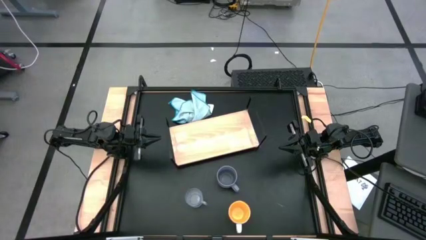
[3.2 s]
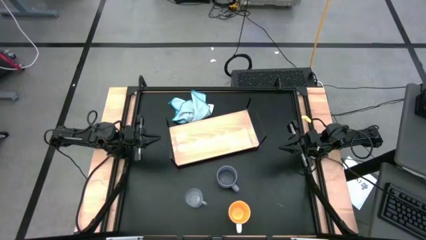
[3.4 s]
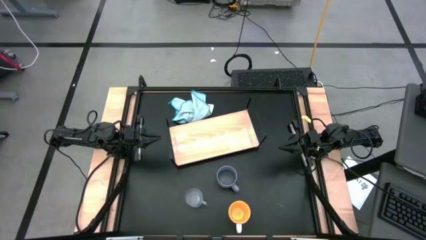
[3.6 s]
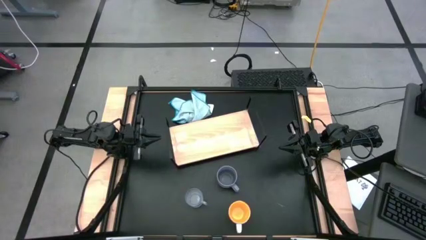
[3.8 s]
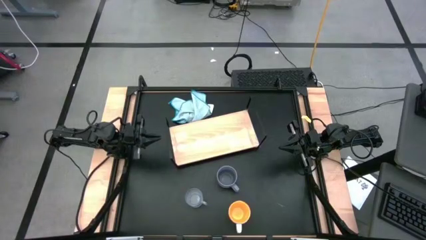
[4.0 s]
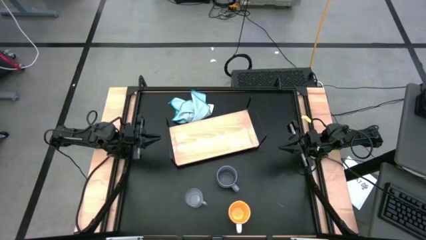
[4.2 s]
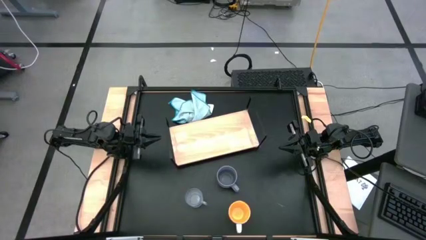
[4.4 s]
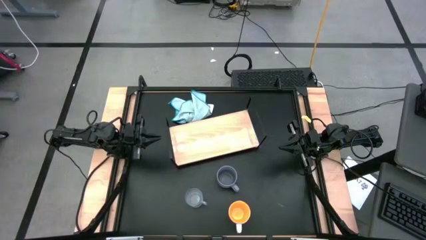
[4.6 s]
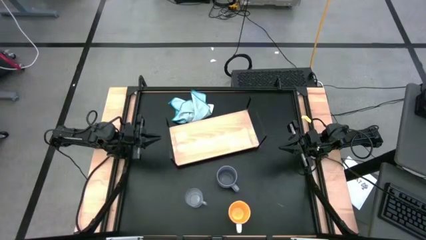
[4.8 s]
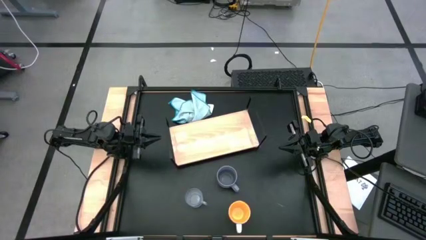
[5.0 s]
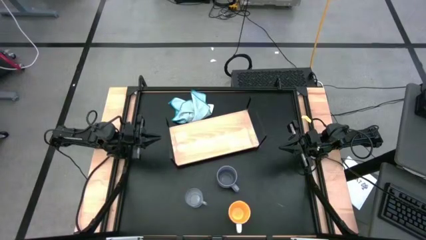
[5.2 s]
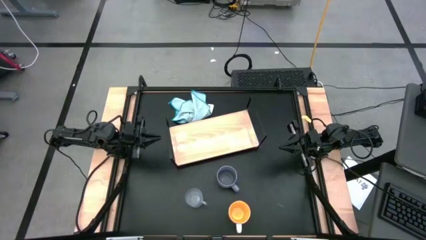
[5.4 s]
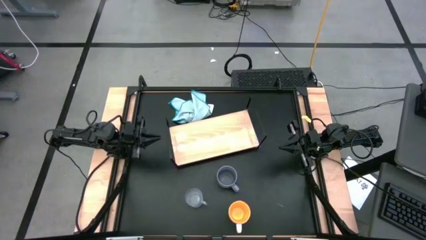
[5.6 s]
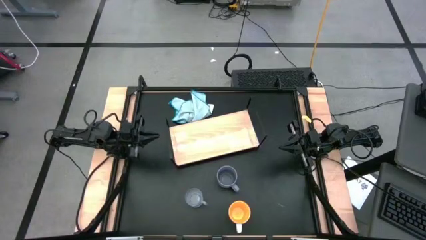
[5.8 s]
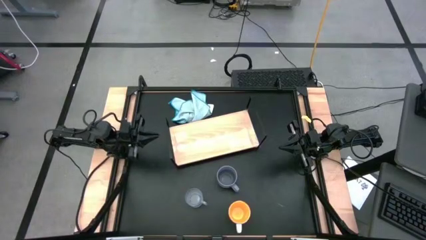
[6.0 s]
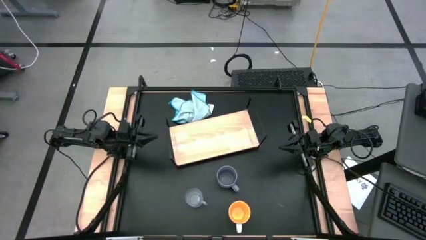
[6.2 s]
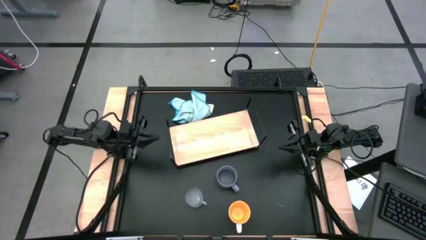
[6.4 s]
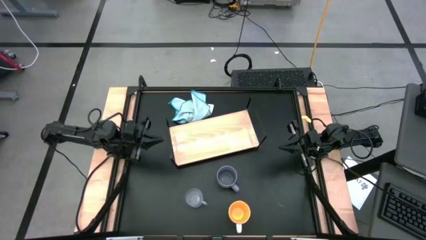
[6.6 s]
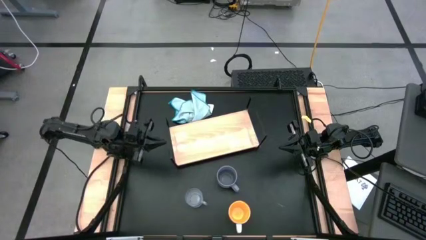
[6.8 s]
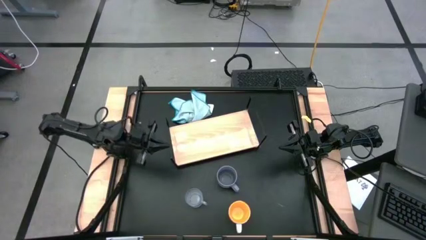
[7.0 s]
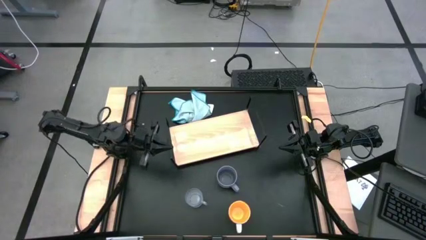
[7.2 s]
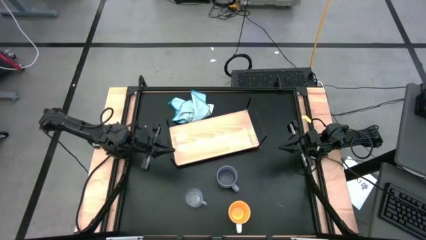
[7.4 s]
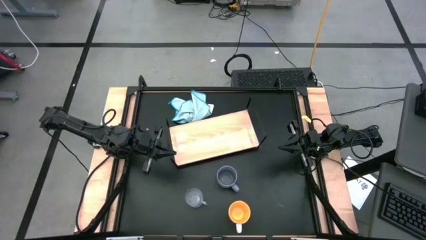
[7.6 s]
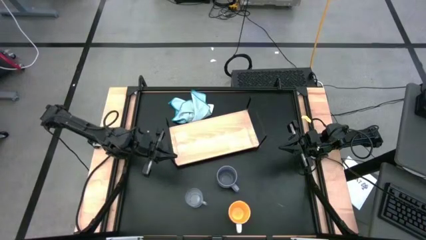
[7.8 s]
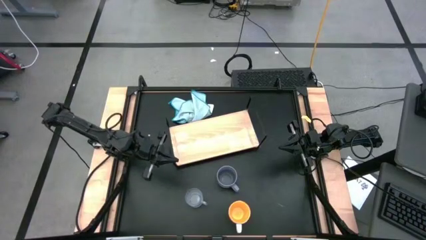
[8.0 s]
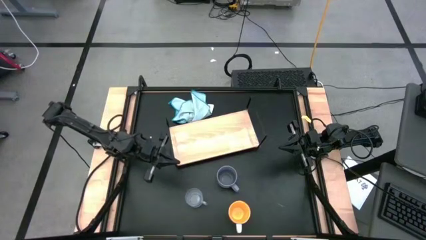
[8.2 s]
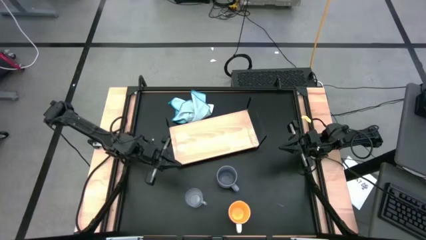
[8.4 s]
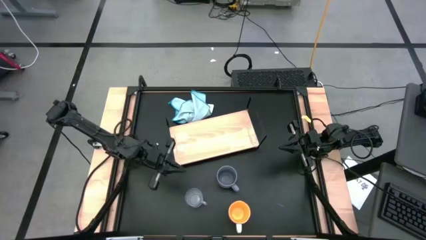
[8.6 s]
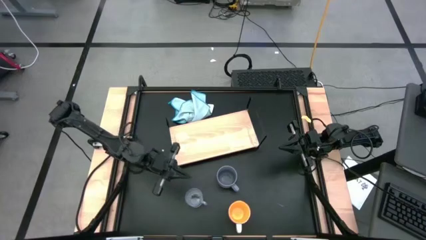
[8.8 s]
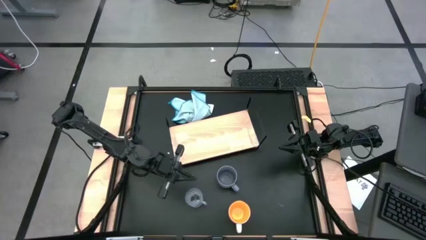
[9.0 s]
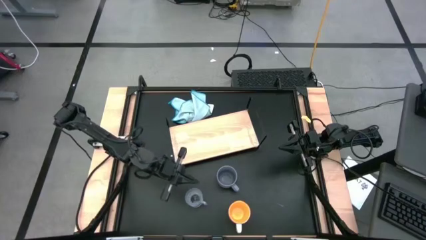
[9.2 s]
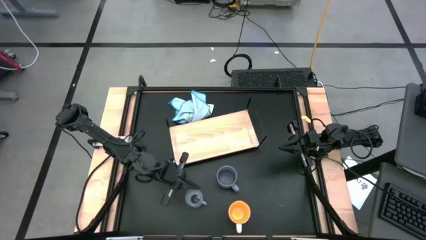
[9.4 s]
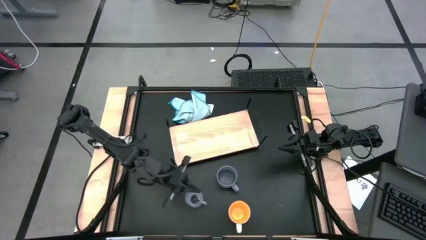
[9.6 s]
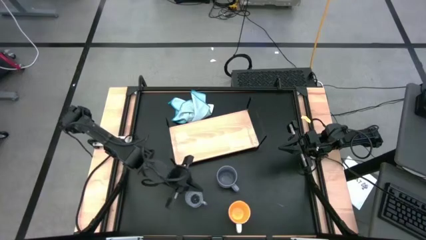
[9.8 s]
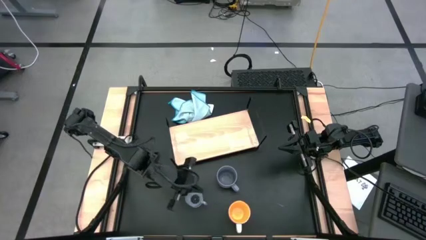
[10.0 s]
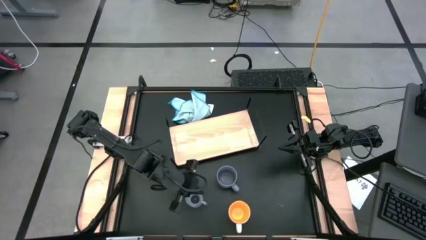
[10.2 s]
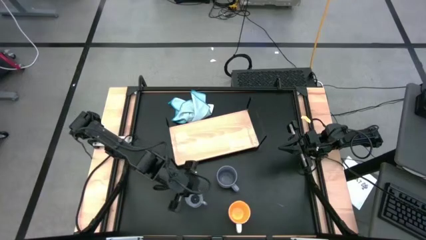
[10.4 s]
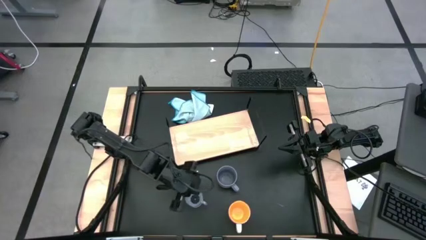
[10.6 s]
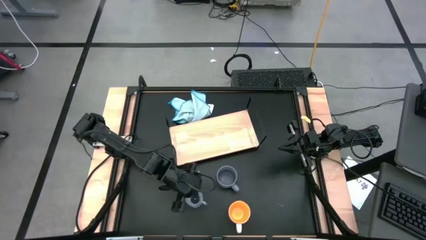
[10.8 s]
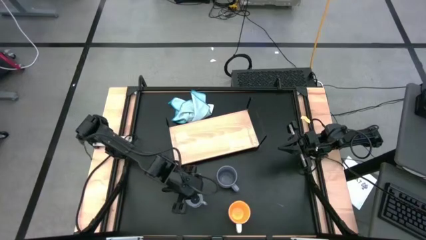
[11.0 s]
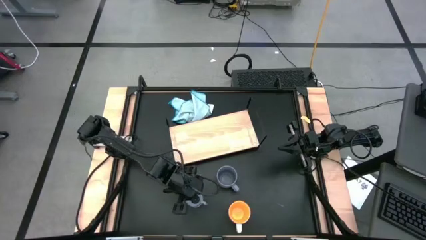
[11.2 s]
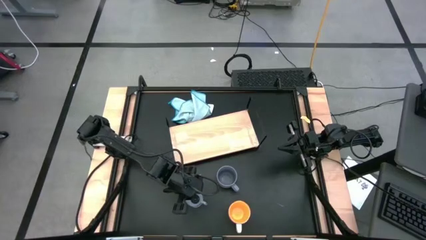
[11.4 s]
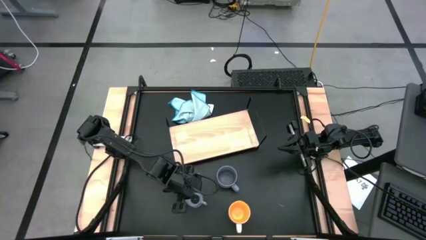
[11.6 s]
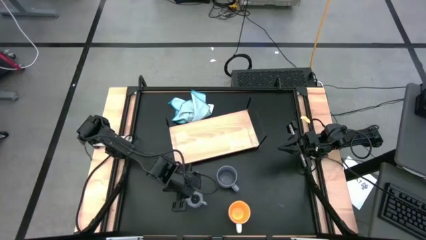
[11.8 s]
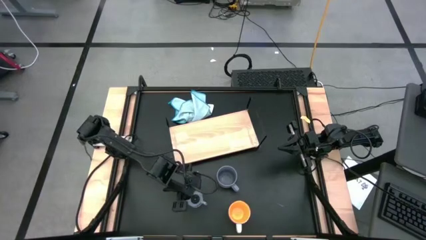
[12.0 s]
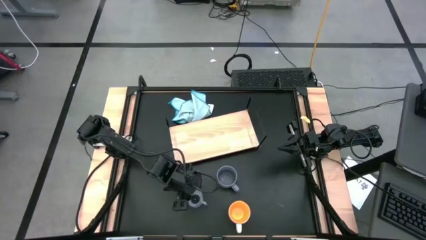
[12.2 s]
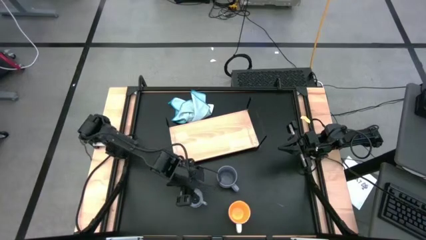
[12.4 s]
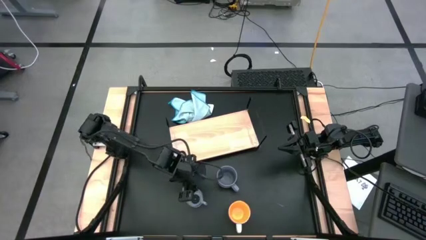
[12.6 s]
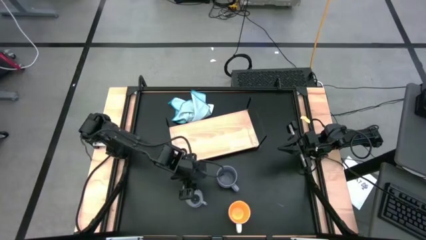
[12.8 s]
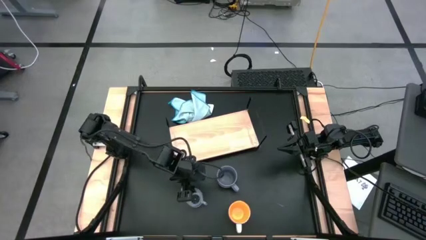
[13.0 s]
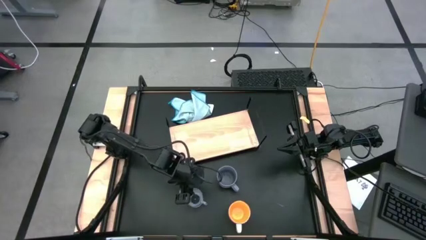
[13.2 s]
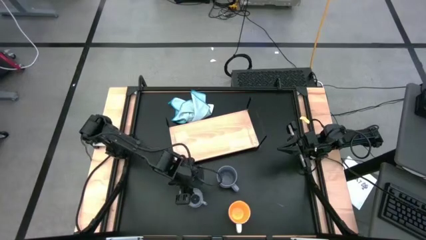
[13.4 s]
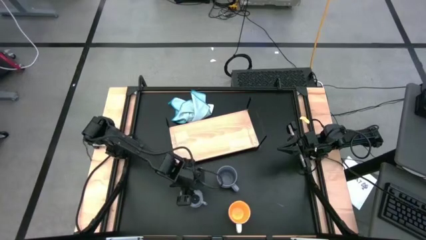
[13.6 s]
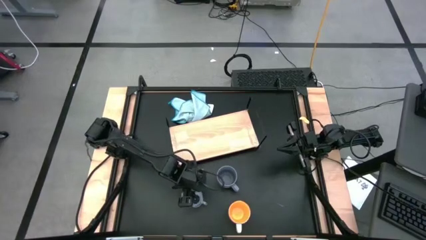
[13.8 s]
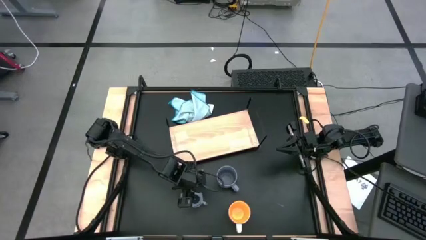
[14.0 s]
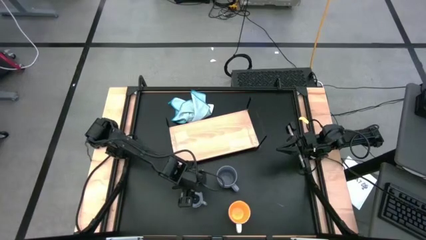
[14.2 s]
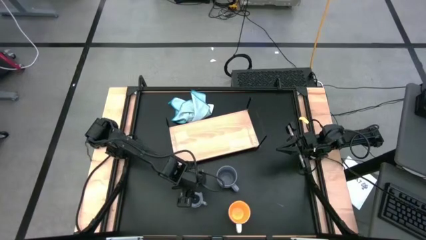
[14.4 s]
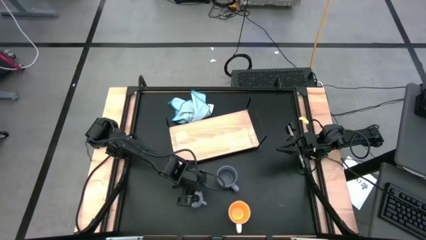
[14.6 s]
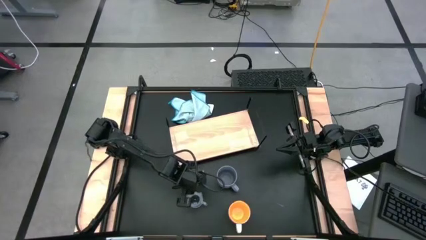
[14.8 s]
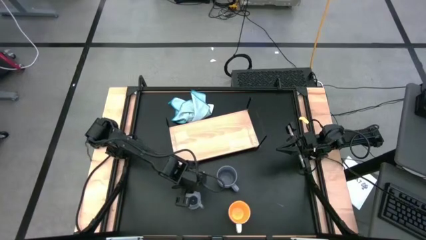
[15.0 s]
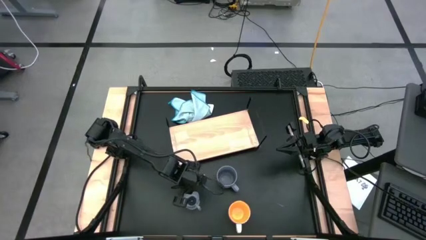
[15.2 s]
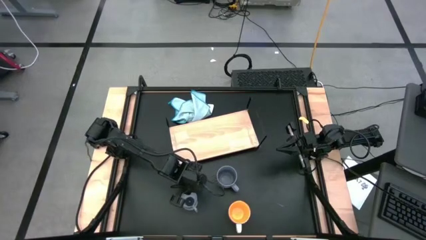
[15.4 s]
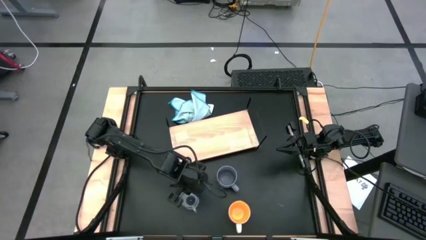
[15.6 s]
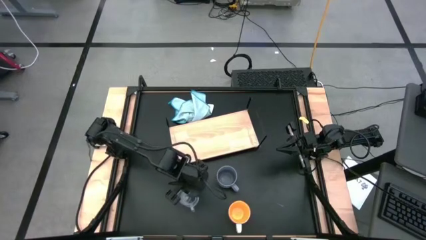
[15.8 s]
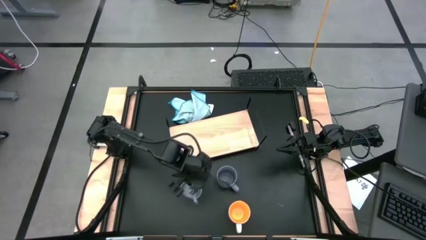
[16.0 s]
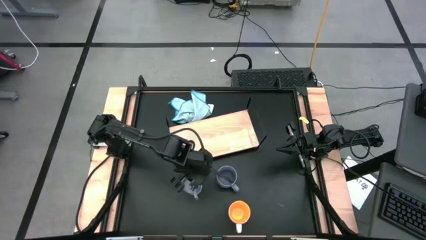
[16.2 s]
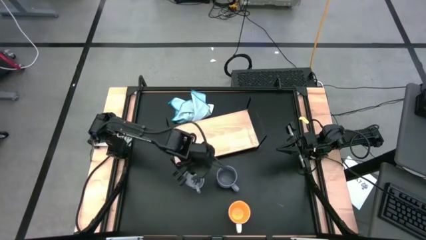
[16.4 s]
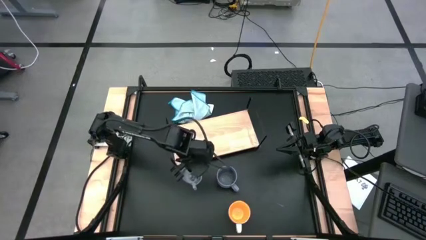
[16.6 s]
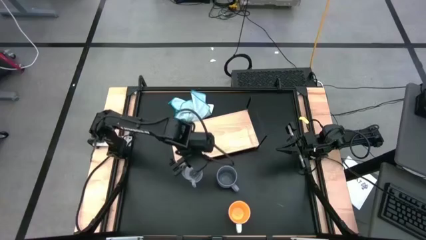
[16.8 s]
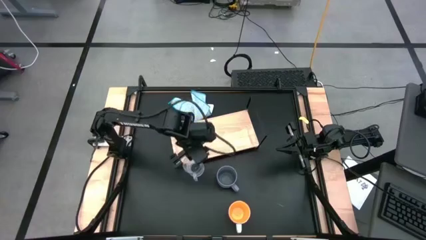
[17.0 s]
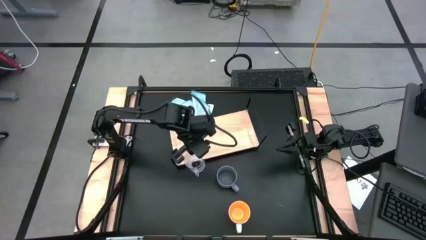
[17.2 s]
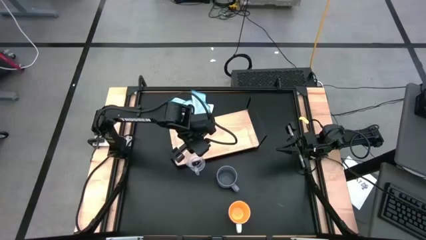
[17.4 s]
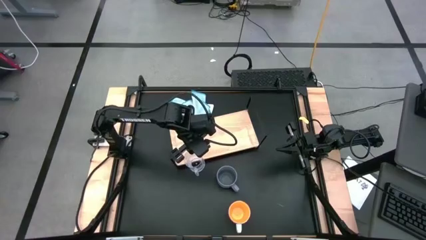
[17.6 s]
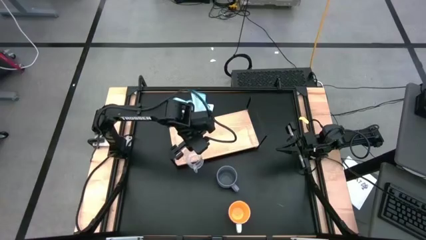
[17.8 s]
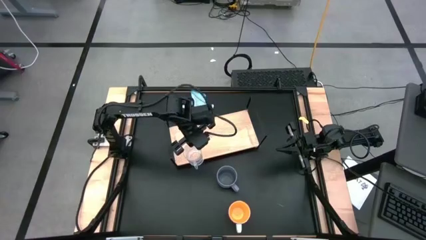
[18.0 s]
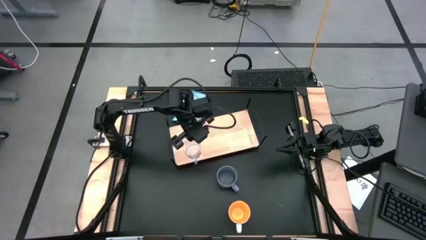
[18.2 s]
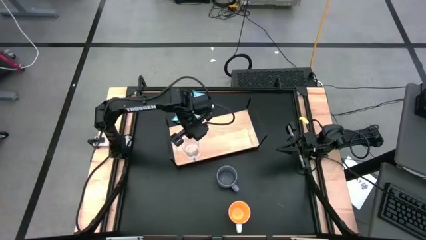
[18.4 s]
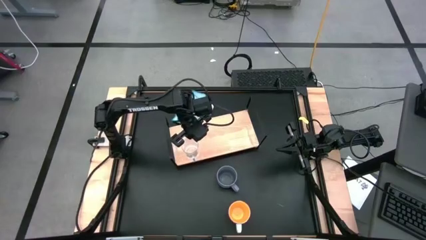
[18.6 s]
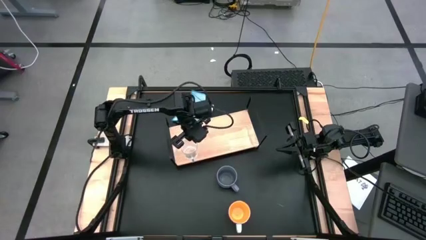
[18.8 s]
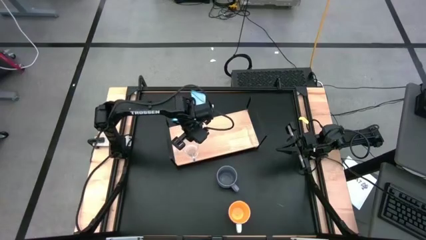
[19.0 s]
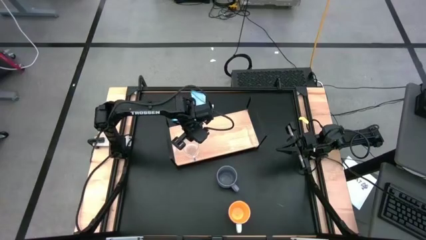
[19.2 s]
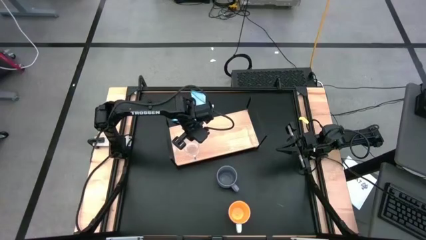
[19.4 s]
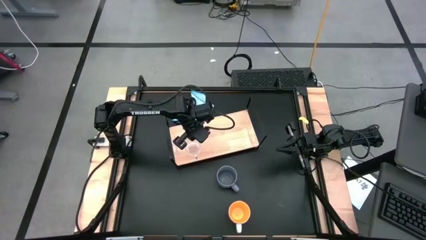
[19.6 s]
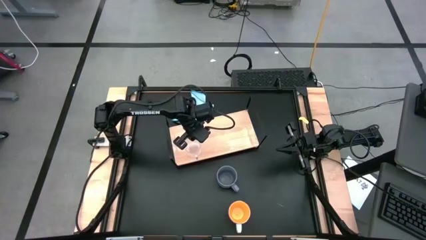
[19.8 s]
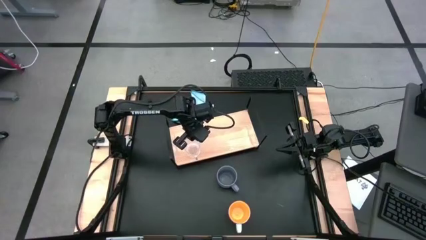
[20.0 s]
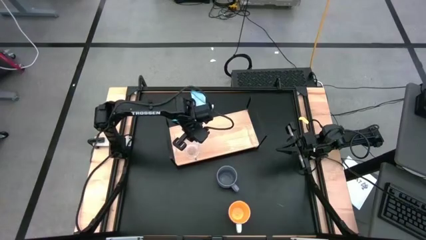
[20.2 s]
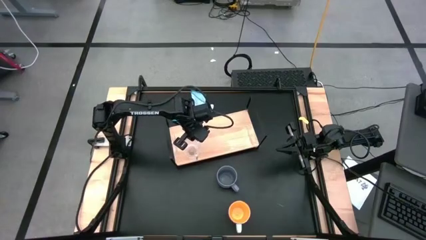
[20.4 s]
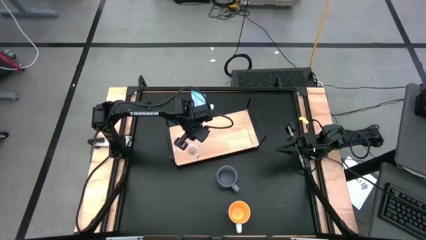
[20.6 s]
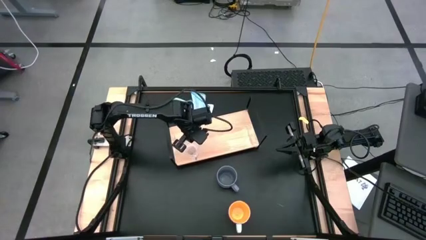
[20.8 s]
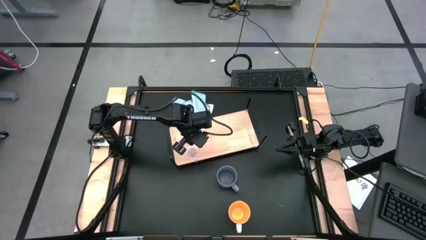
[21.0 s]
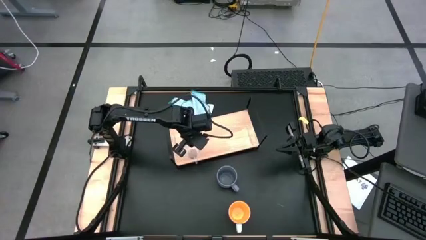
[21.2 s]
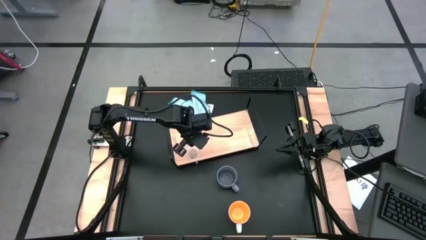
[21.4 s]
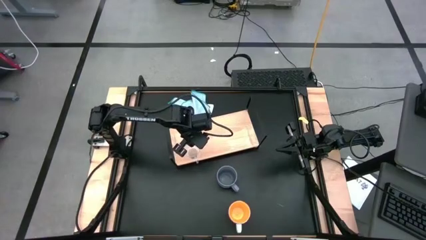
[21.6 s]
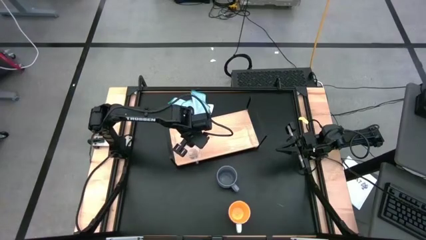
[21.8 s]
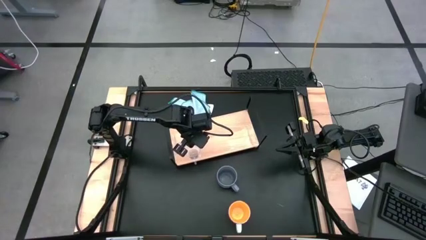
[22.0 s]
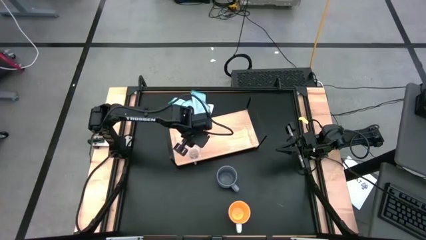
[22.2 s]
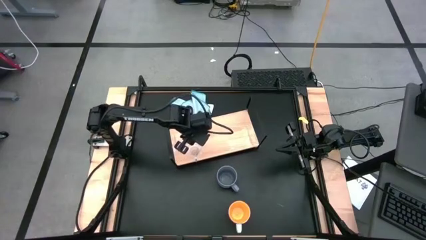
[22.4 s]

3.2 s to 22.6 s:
Task: Stack small to large cups/mugs on shelf
Put the transparent mug on the shelf
